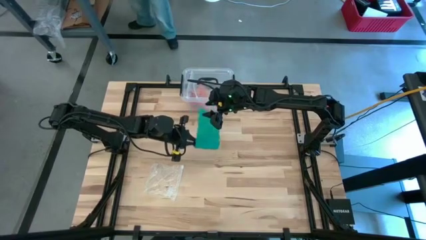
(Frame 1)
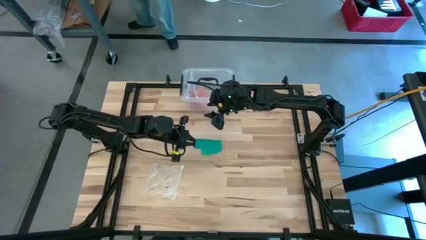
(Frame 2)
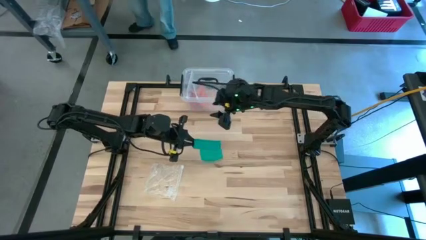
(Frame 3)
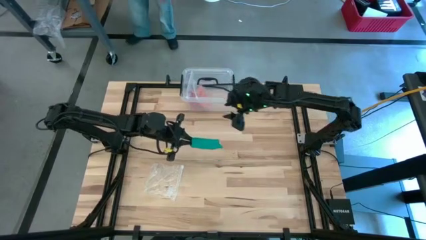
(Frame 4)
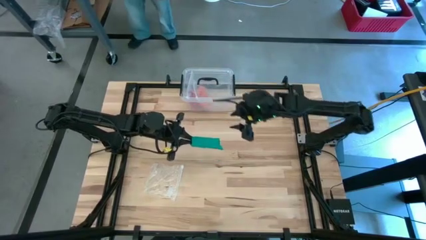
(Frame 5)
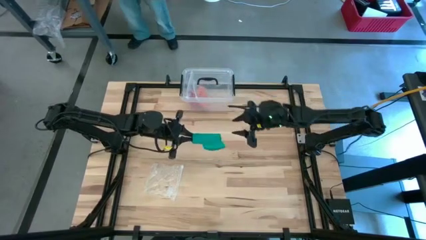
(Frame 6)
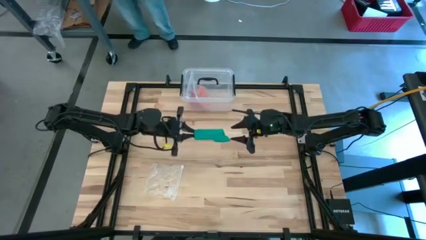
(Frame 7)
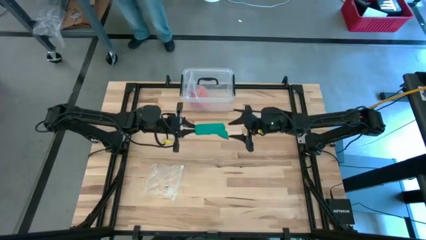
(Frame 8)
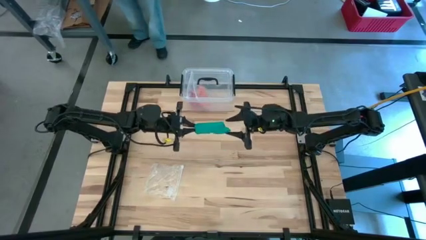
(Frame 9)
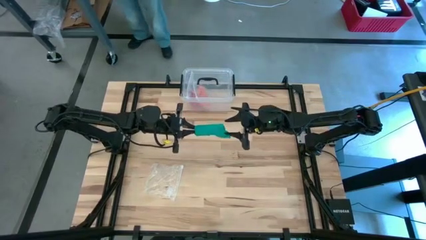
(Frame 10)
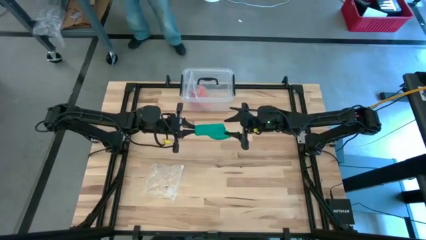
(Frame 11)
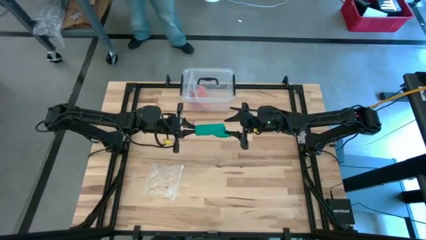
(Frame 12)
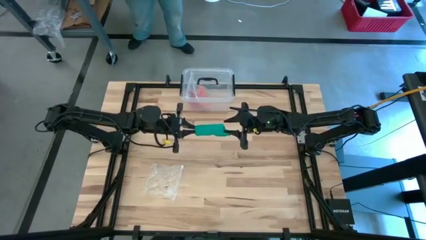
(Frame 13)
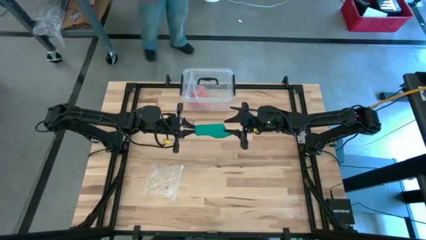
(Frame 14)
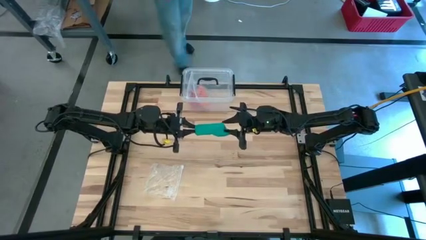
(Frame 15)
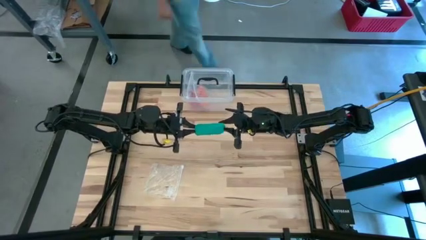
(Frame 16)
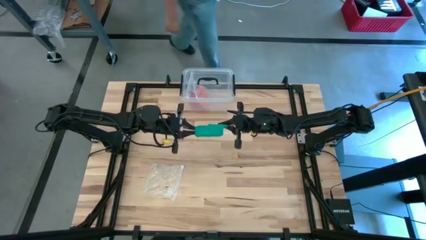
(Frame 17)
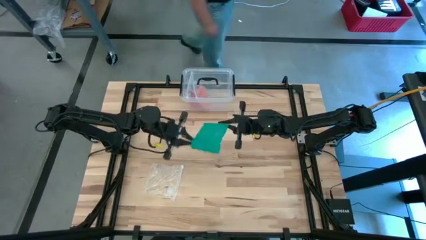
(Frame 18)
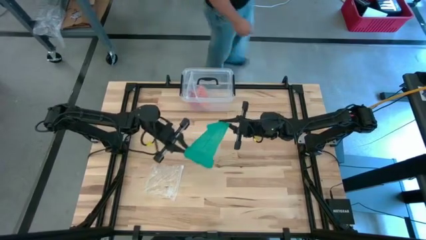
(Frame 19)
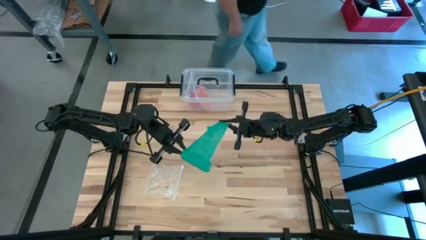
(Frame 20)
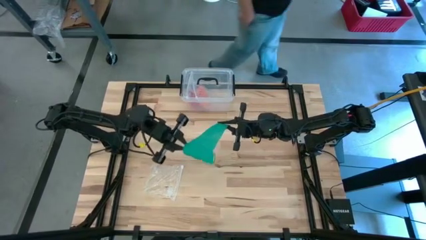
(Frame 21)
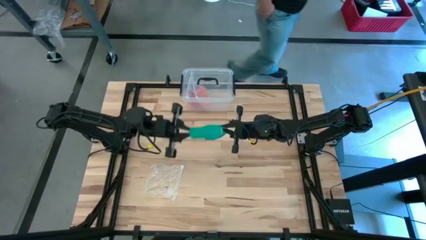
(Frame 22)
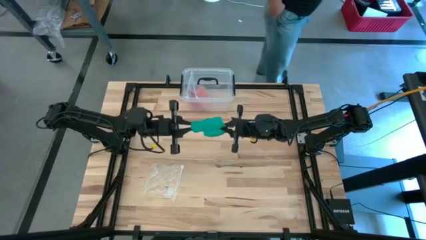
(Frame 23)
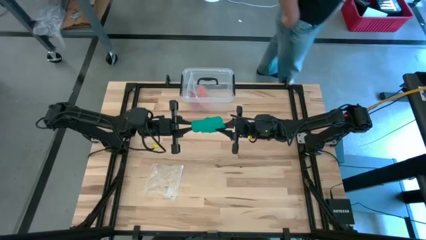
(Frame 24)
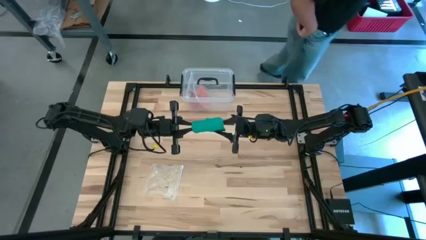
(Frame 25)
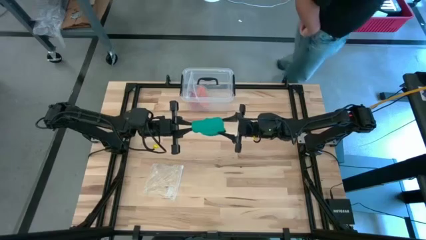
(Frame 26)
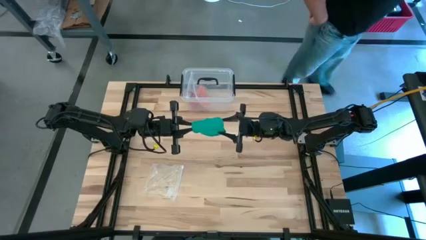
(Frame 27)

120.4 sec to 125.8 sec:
Task: Roll bandage
Roll the green bandage

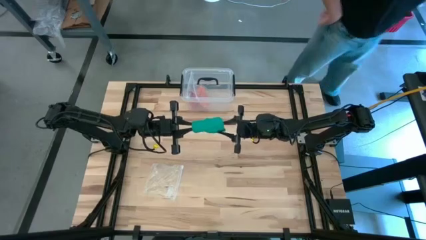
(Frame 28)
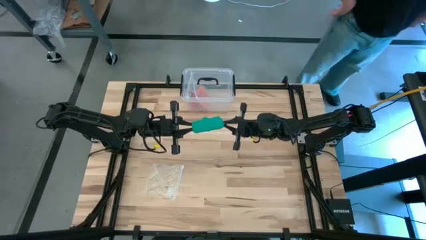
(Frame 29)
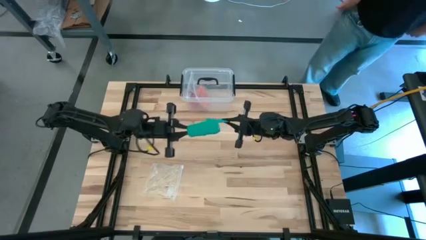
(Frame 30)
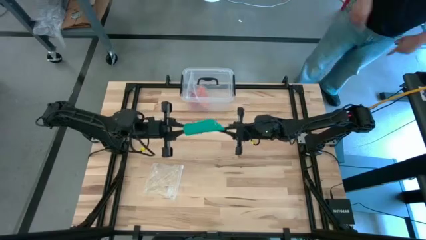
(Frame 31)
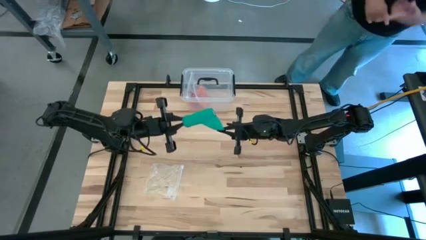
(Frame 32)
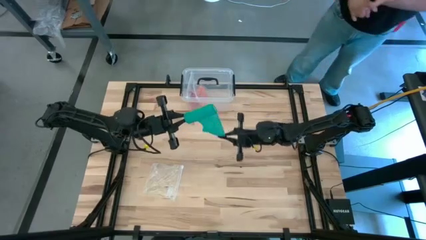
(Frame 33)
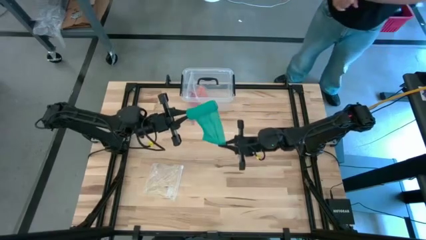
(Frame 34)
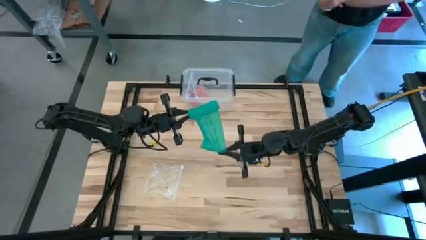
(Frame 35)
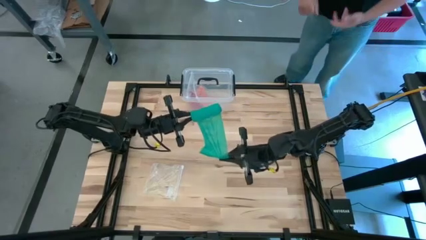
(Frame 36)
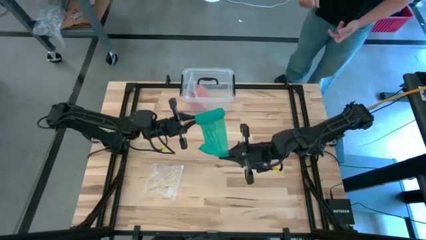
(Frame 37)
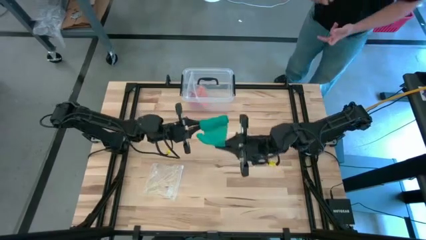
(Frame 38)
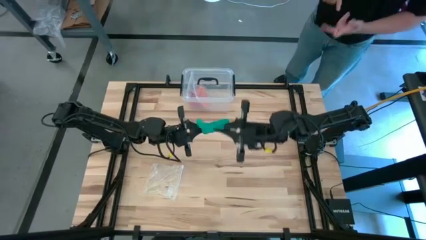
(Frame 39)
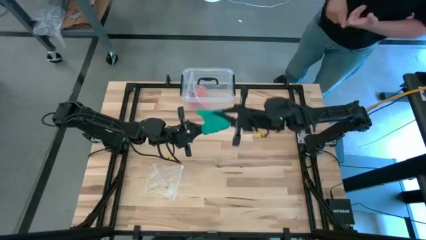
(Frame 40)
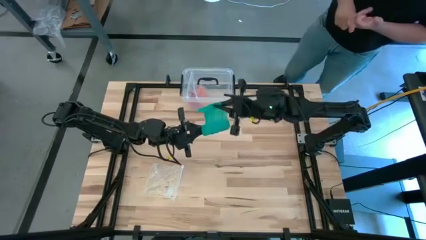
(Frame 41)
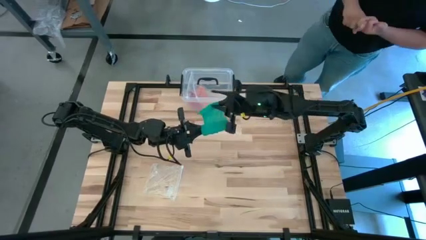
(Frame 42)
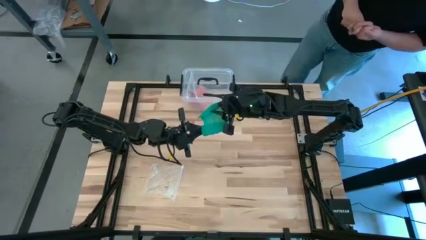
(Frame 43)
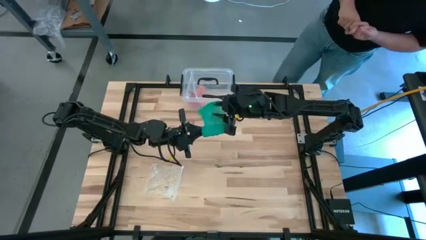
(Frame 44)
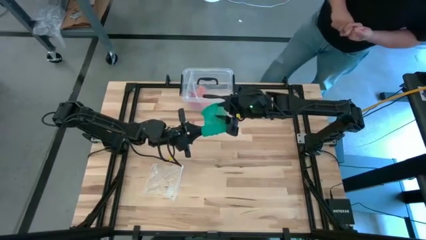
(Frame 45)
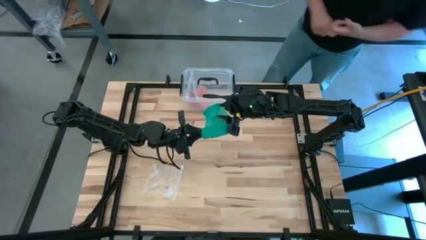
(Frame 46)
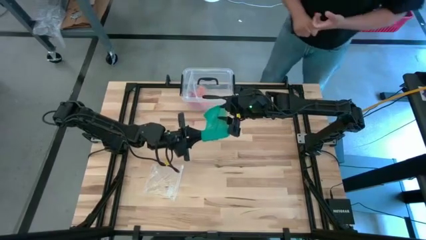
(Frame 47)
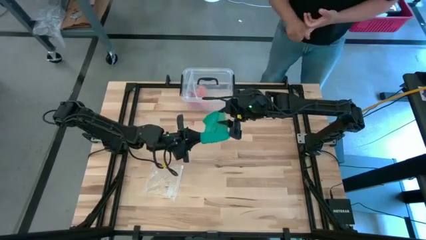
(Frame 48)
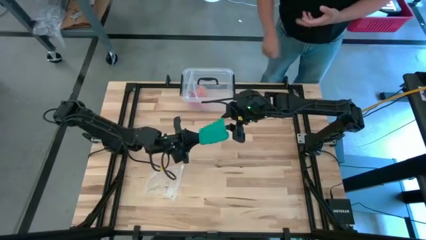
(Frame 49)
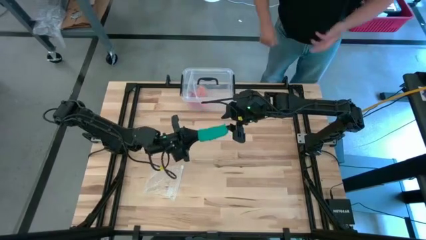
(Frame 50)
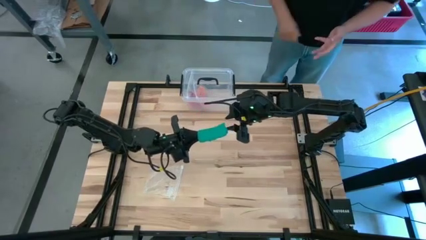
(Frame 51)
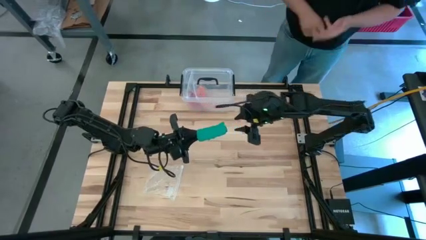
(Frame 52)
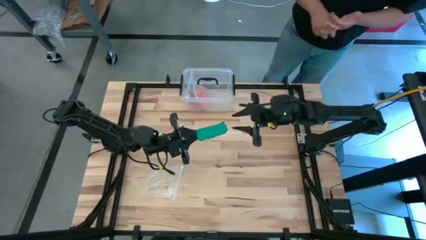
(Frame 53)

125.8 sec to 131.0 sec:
Roll the green bandage

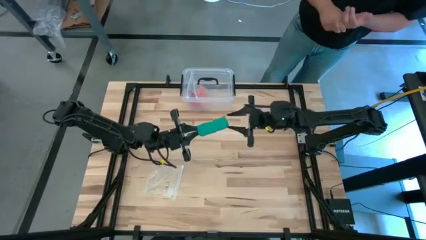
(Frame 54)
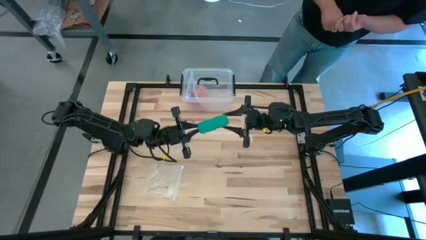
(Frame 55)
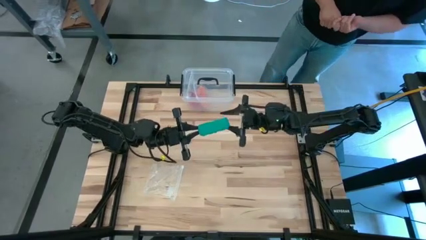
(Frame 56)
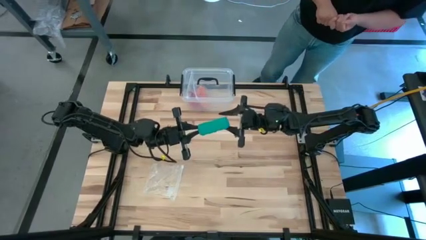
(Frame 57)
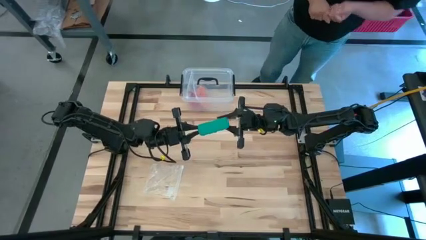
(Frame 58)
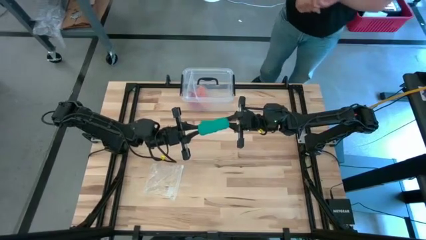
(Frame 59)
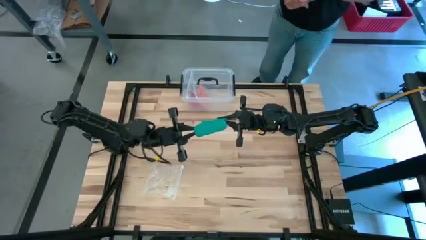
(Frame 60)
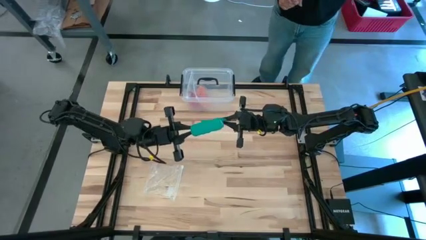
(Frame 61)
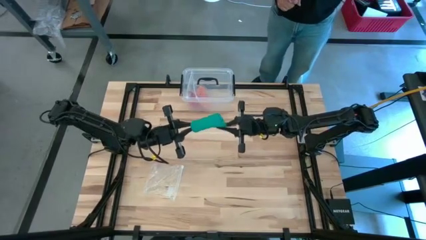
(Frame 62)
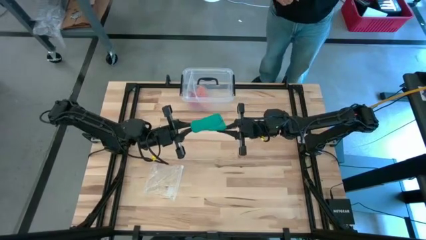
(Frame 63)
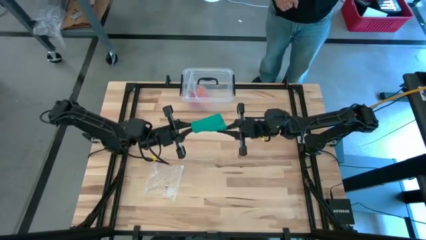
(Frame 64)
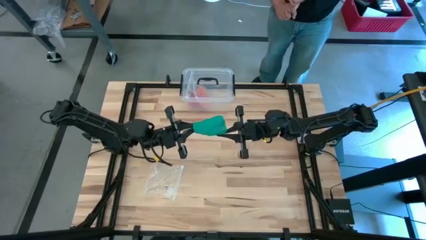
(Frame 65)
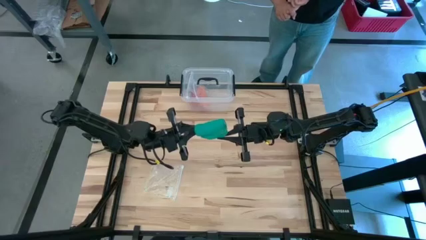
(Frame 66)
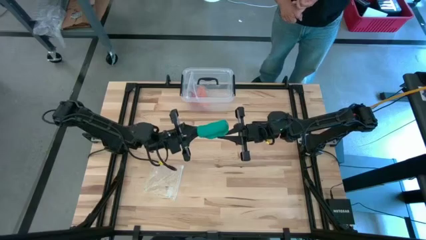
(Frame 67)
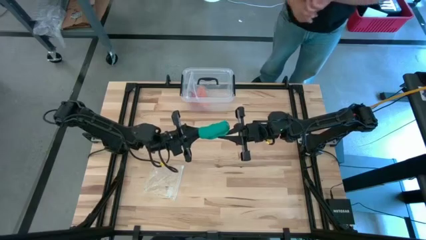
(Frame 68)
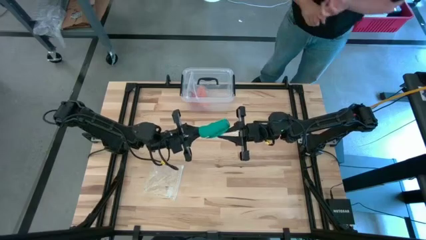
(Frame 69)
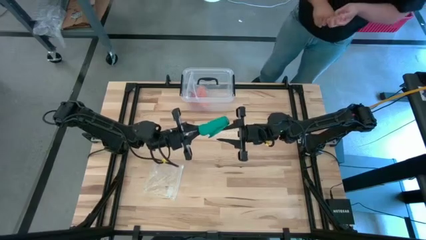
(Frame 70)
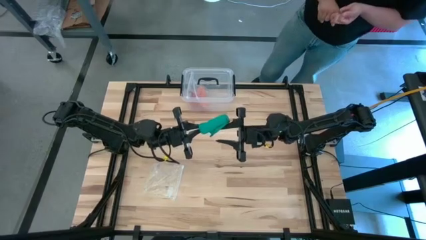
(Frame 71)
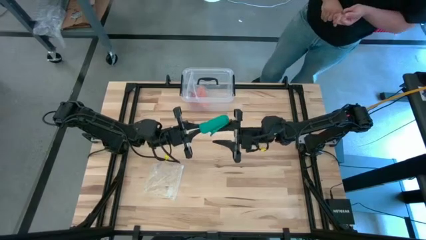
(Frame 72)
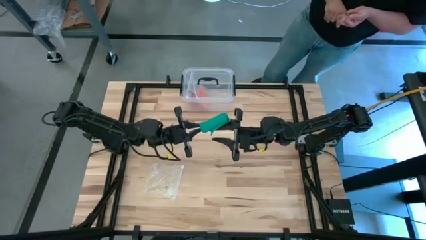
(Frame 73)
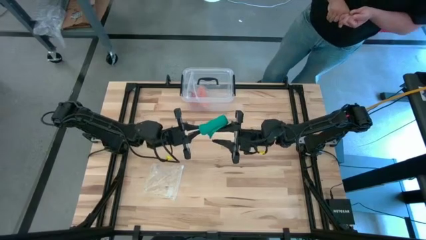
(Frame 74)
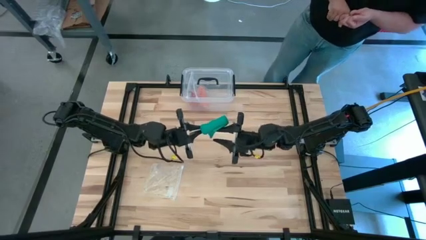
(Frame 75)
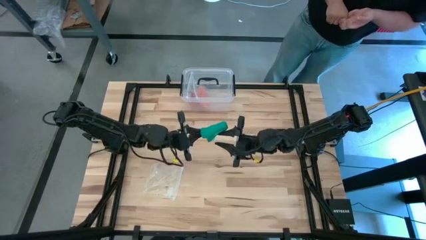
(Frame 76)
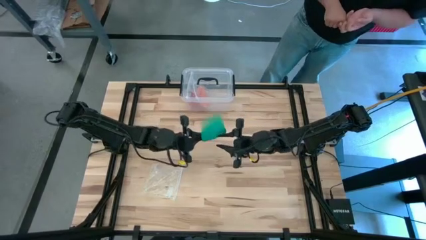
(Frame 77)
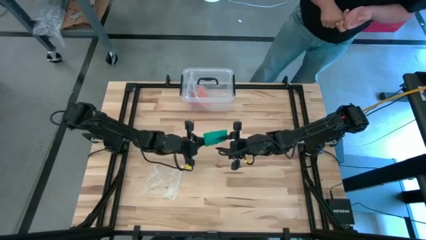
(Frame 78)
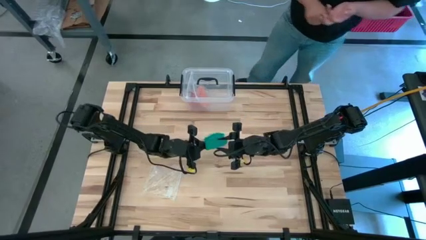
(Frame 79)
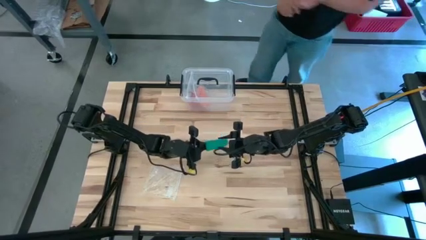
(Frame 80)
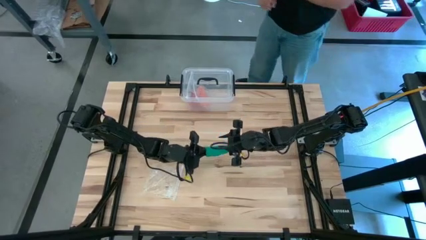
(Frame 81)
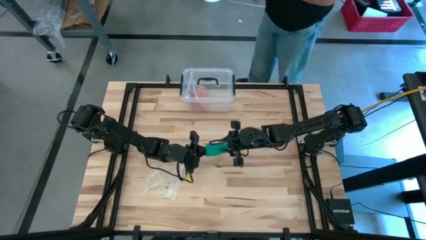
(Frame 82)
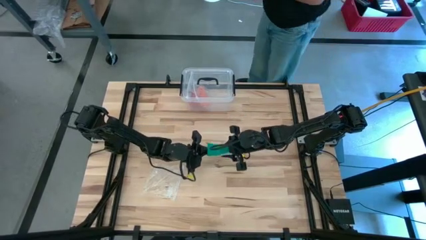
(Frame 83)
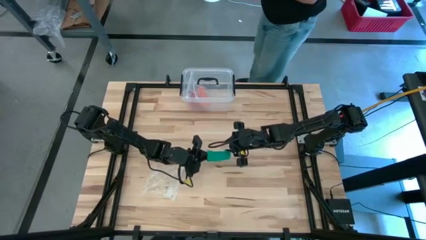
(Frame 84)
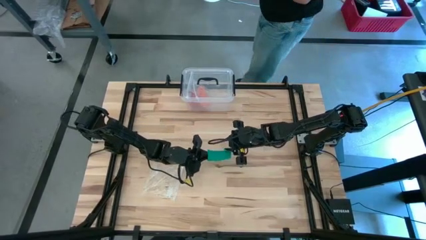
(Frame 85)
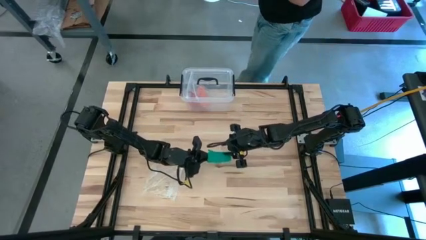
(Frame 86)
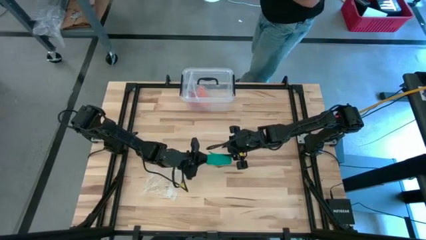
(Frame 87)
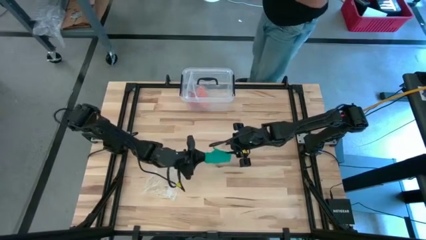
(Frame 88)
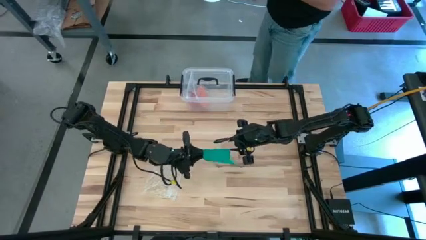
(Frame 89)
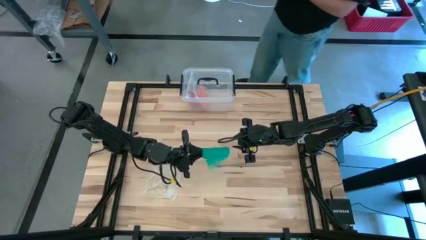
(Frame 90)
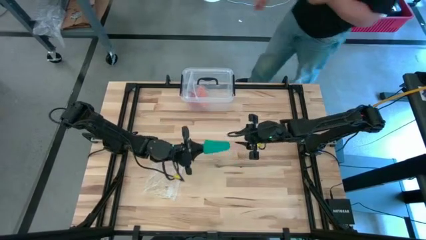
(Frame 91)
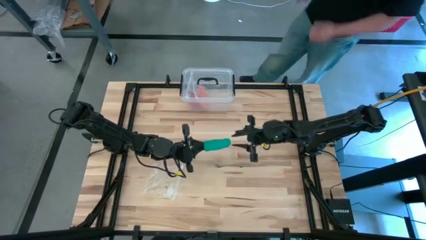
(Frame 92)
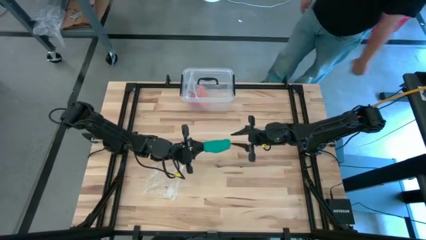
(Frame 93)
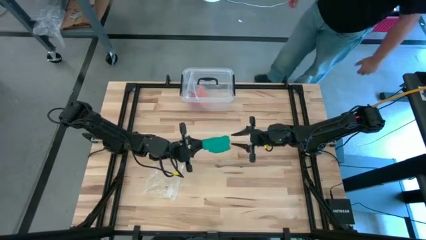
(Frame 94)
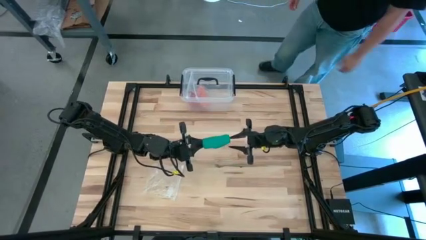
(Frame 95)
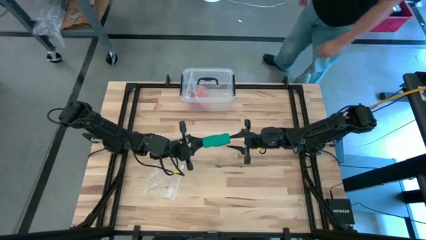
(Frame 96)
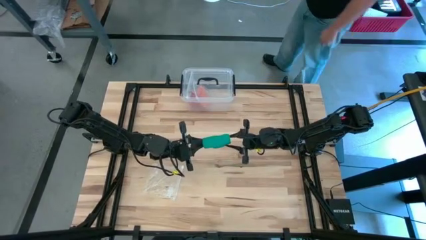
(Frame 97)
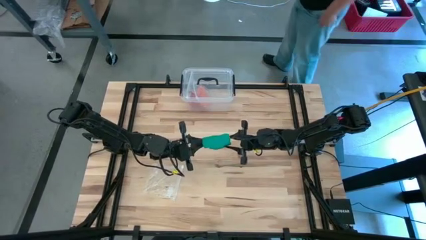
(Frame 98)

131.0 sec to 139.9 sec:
Roll the green bandage
